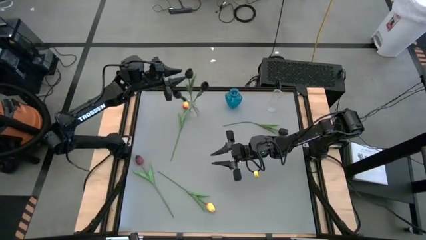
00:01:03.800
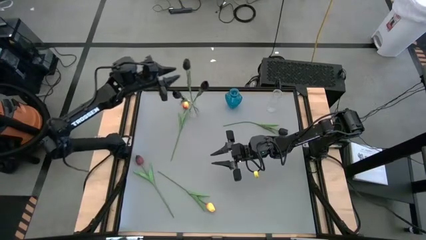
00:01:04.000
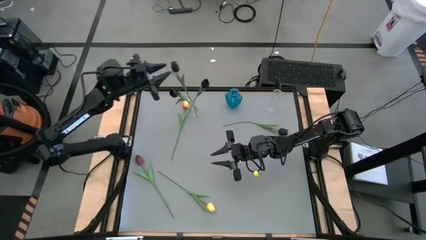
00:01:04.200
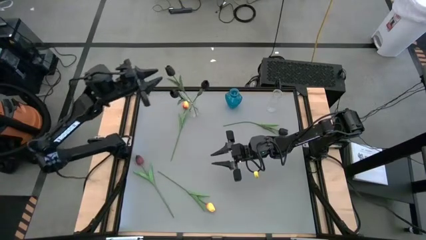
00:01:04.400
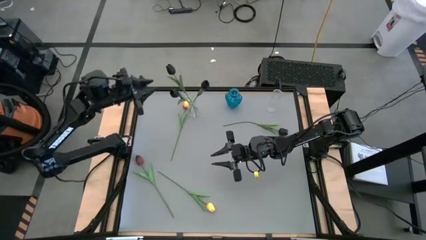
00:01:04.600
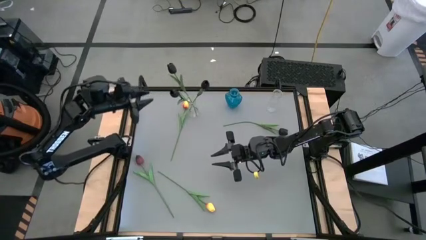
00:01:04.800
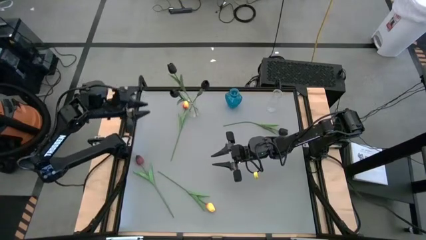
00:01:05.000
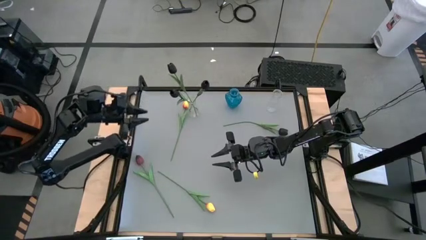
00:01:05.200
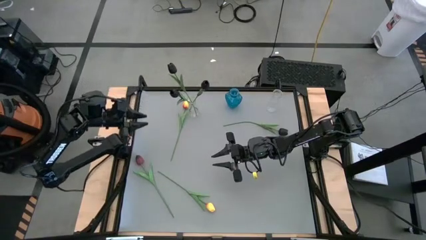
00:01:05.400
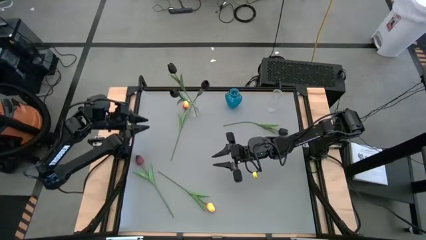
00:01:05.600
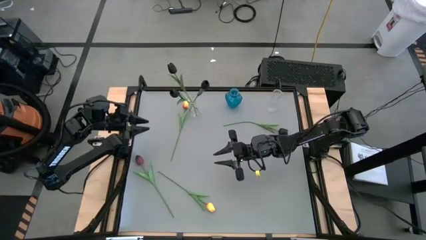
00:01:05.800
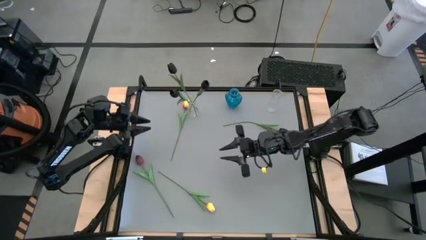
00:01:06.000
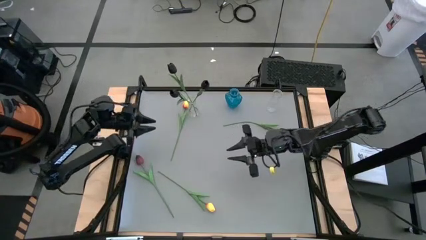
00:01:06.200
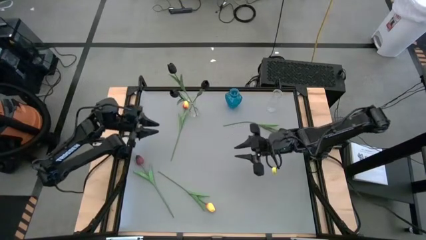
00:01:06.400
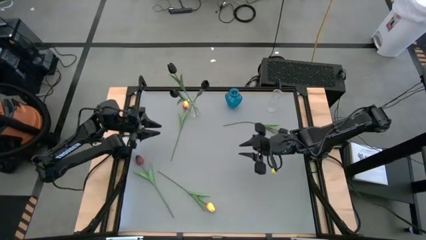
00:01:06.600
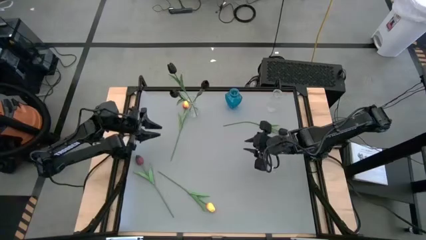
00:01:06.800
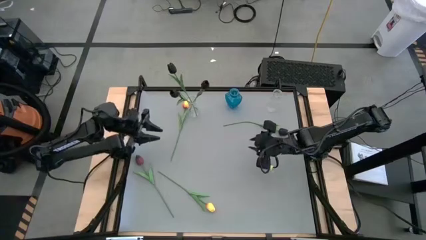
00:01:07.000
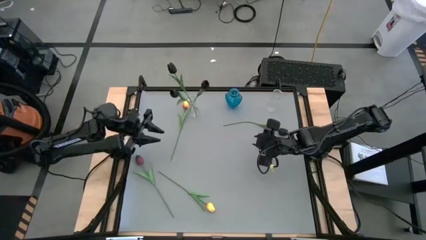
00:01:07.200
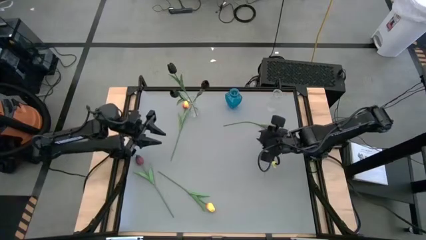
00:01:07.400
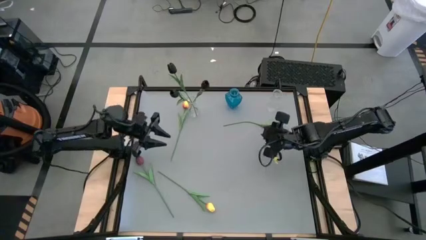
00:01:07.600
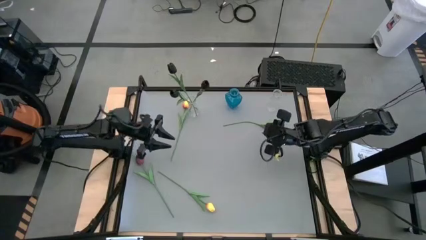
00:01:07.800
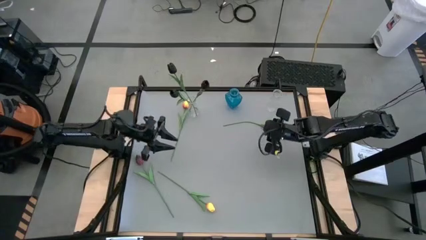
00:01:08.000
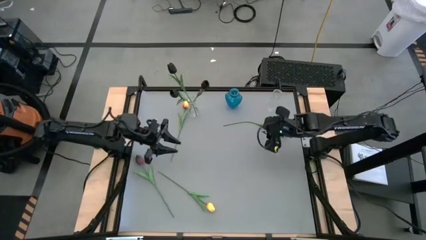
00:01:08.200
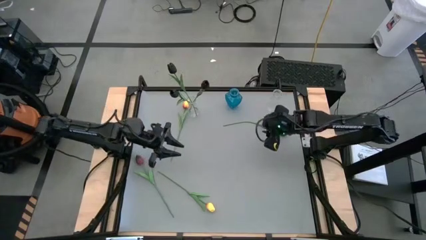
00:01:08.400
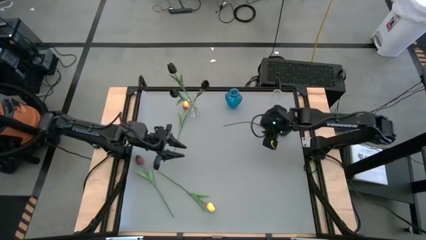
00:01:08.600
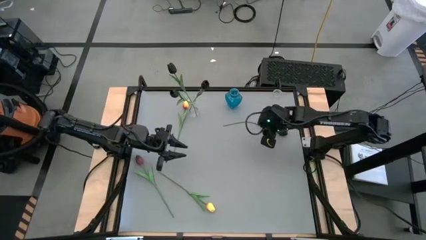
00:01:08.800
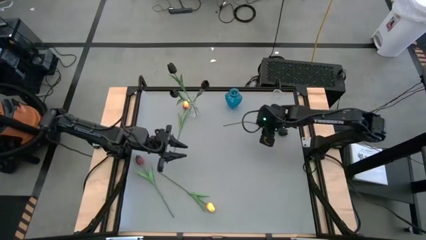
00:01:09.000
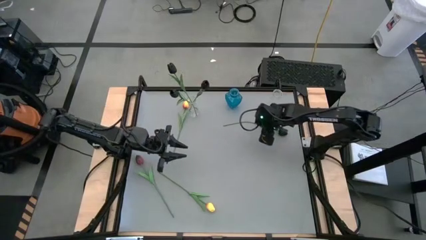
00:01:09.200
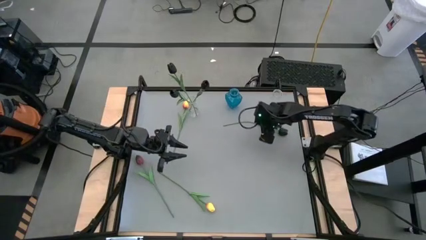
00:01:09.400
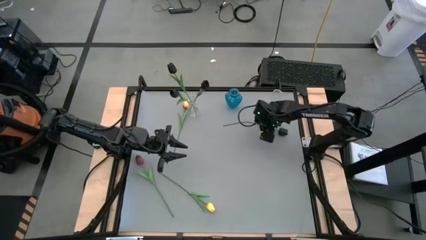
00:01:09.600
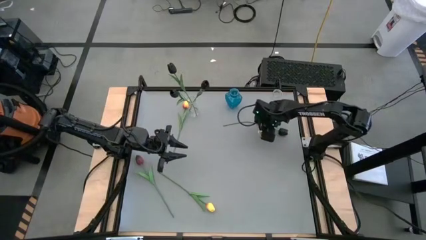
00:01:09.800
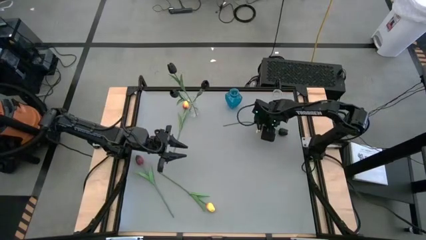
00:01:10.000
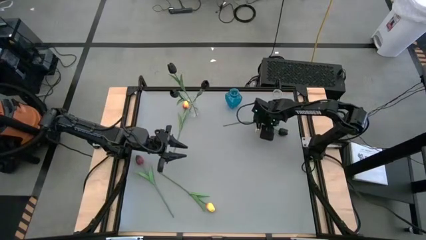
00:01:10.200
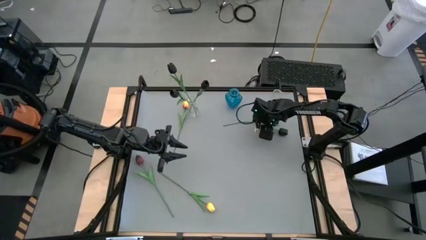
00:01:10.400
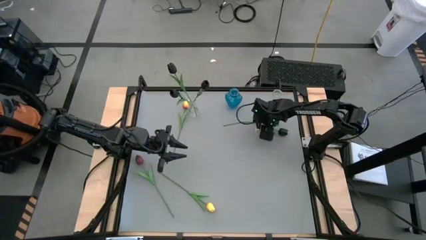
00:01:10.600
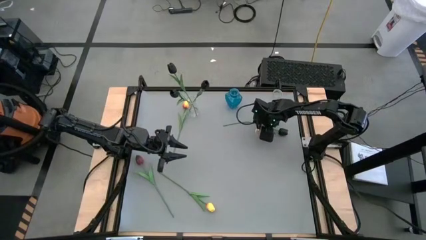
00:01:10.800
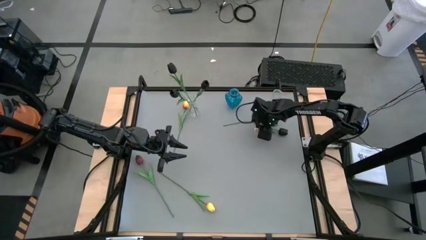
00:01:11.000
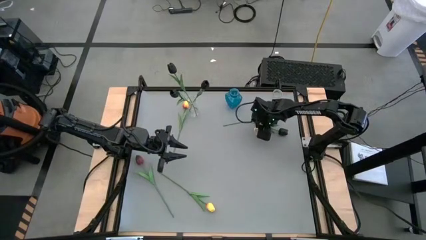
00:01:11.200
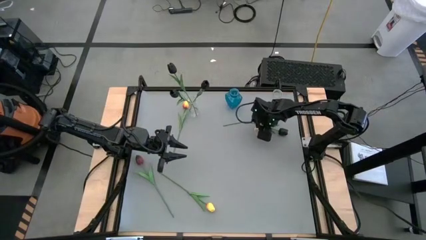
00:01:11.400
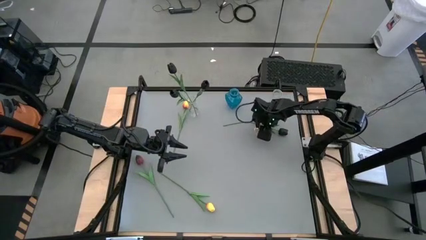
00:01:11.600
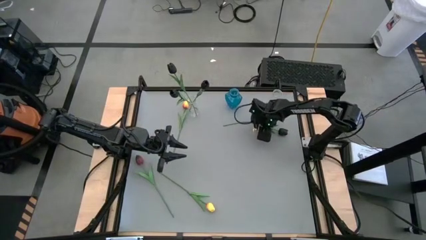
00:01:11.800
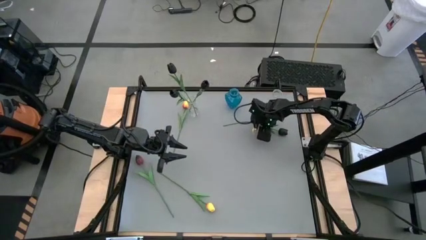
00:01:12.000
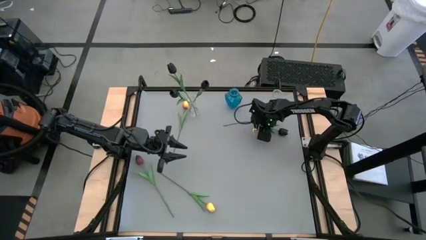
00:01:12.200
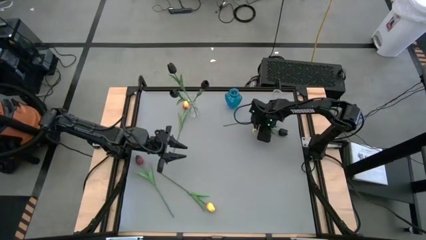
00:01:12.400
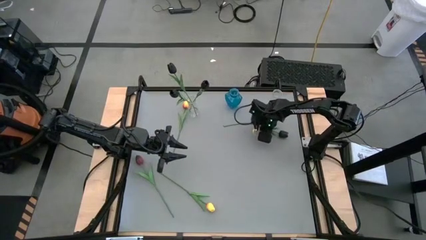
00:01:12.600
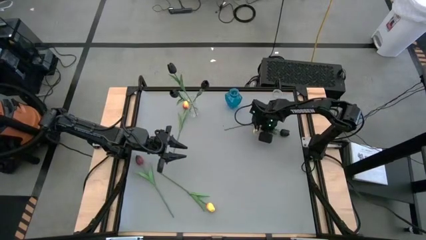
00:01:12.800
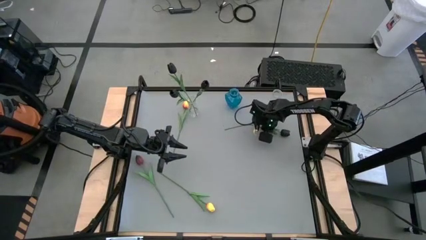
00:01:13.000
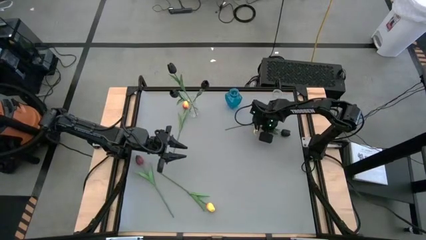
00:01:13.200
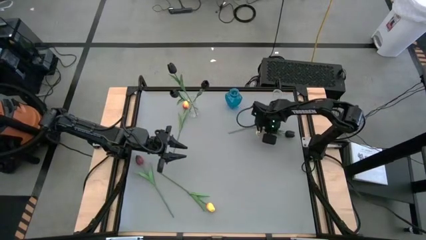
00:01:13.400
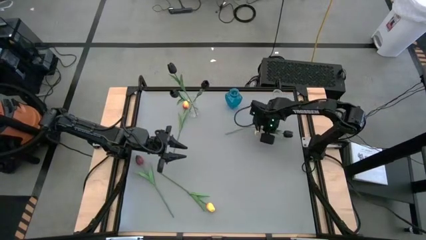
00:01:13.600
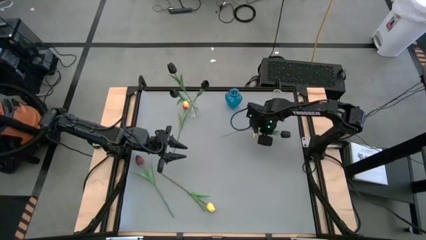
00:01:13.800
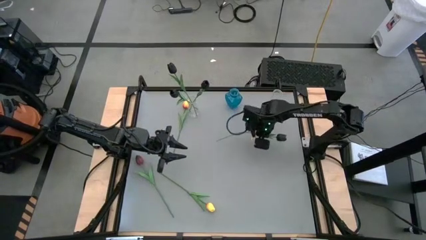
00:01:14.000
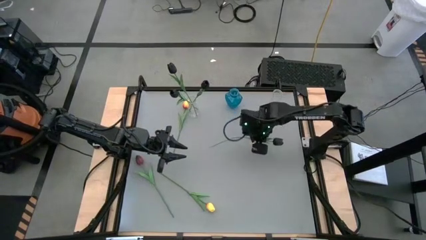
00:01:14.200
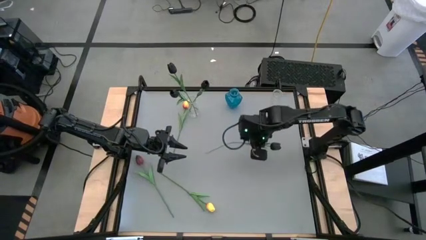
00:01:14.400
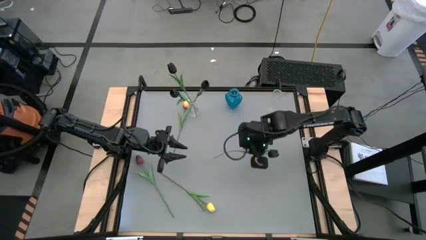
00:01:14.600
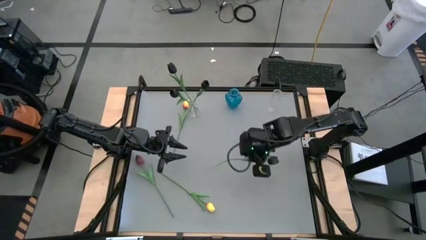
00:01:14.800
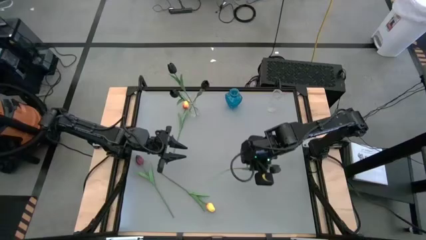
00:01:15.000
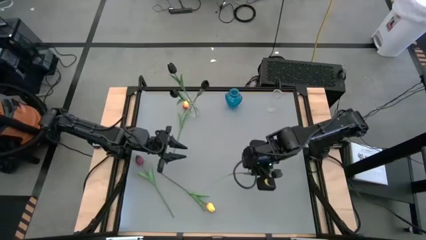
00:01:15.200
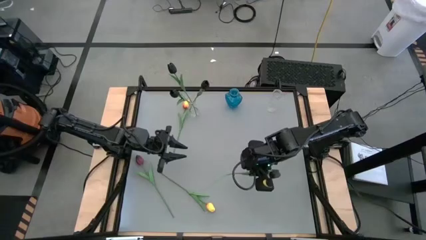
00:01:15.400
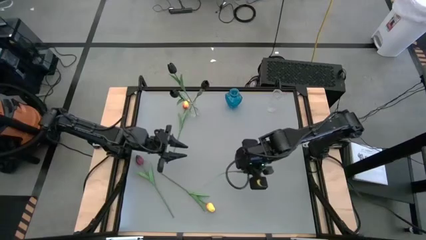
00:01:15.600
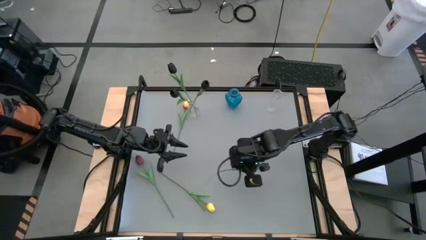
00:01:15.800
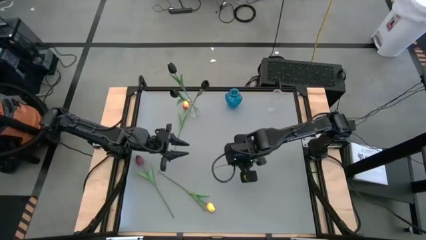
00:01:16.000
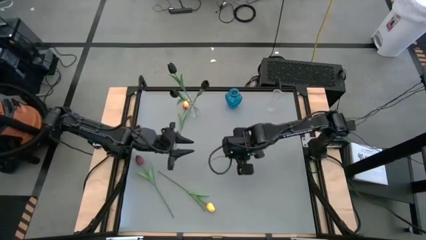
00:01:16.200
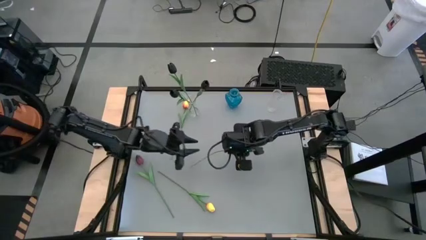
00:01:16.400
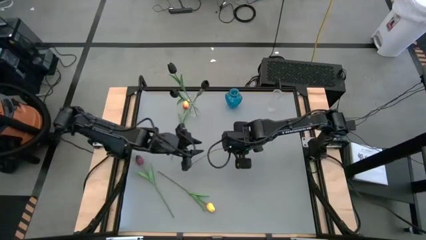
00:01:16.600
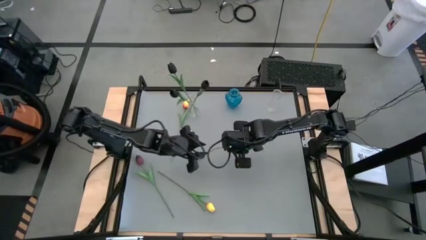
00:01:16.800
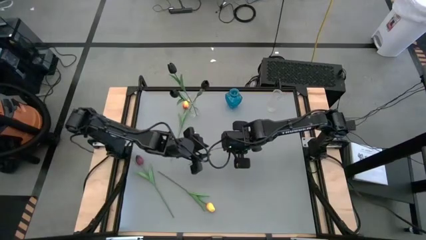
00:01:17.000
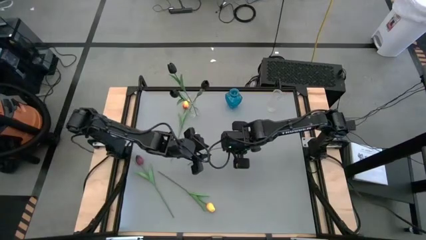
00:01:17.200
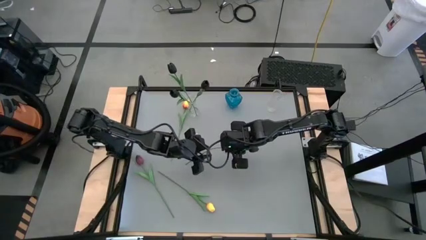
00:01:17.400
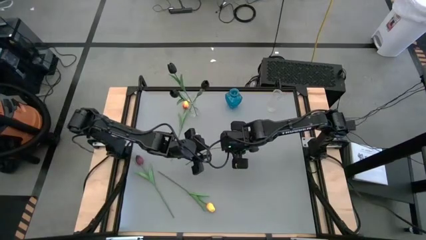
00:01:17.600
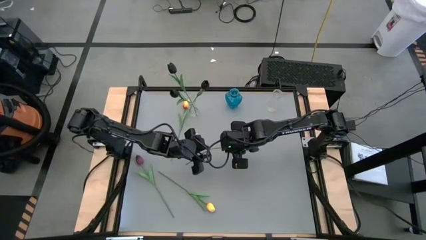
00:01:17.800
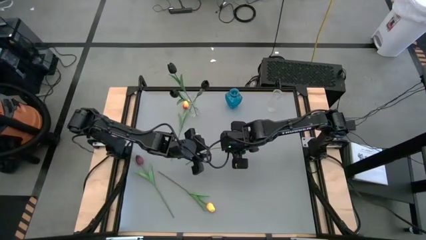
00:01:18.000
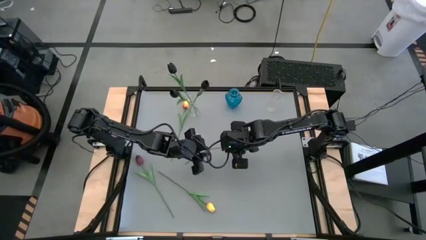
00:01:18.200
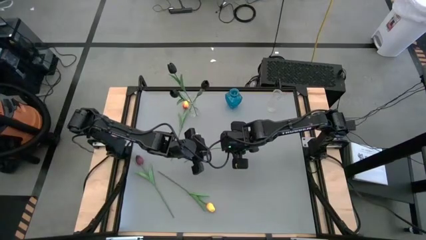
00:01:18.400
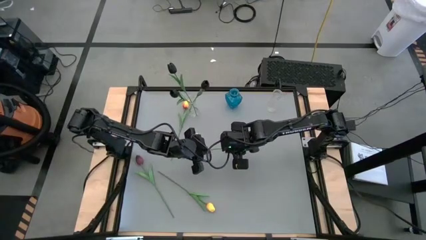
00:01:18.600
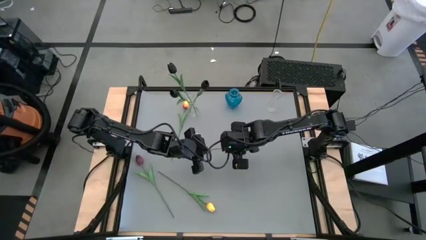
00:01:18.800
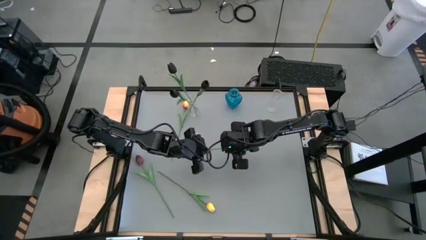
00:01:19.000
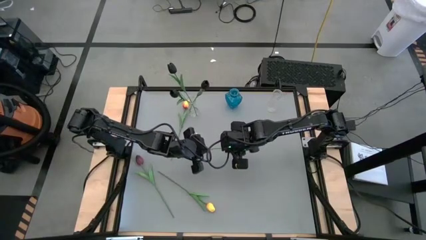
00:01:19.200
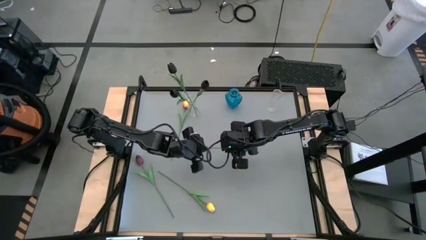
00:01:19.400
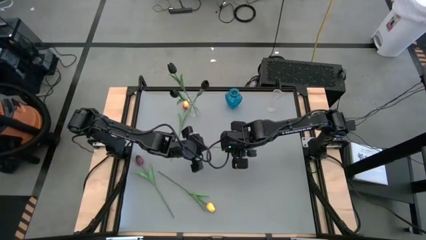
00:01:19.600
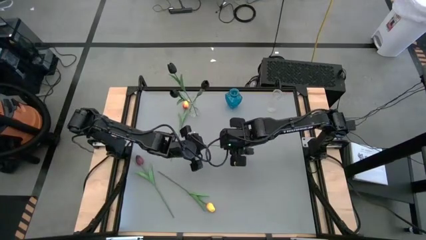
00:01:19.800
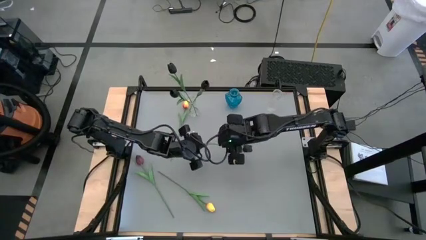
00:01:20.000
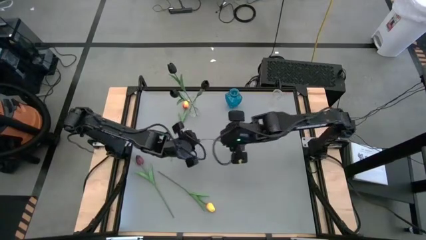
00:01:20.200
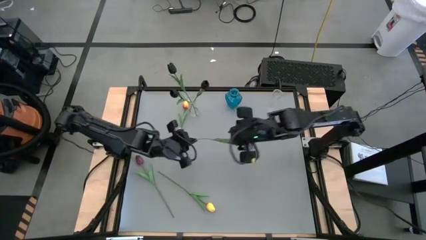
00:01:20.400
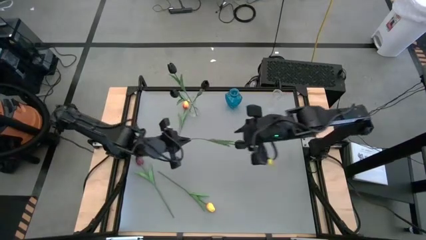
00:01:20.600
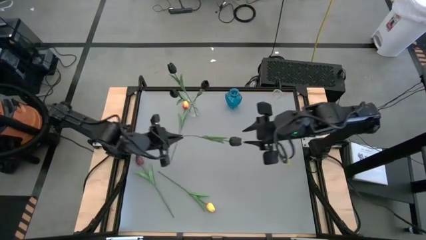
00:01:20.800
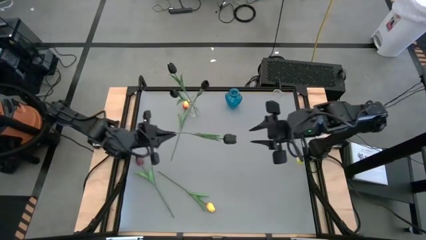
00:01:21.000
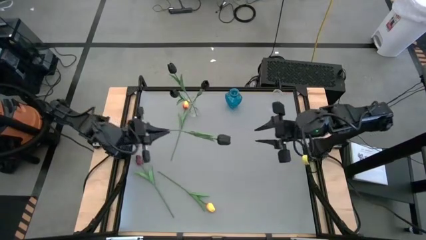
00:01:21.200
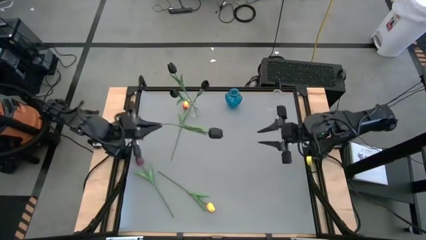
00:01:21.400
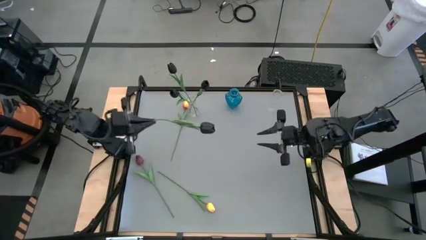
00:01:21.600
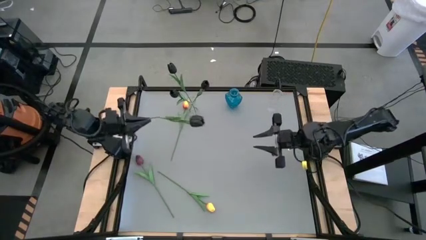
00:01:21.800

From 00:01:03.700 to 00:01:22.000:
Task: Sort flowers into vase by color
Put the black flower into the left transparent flower vase
